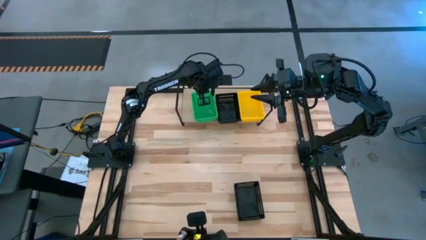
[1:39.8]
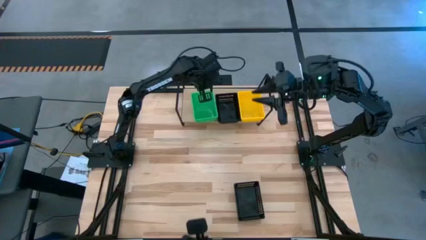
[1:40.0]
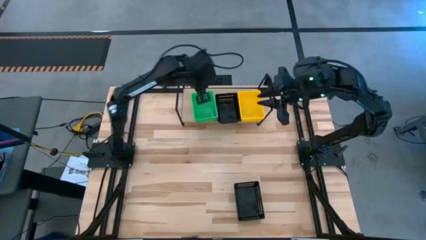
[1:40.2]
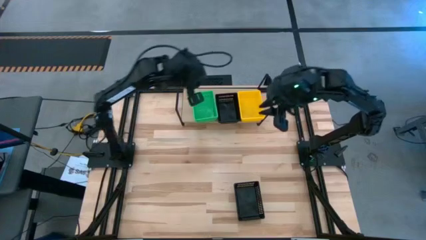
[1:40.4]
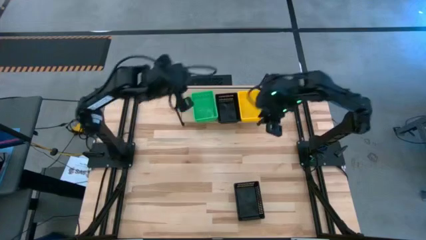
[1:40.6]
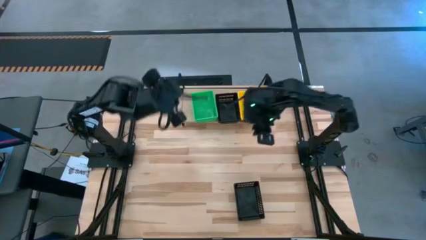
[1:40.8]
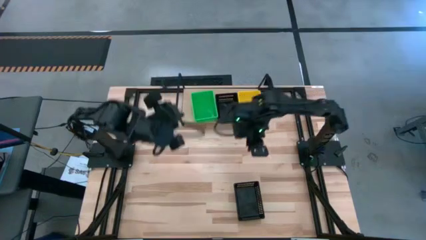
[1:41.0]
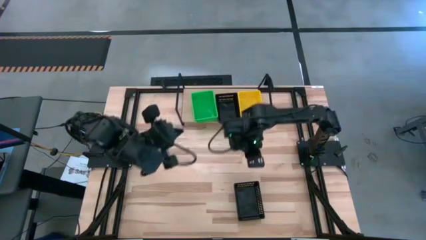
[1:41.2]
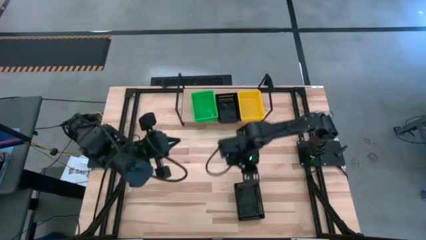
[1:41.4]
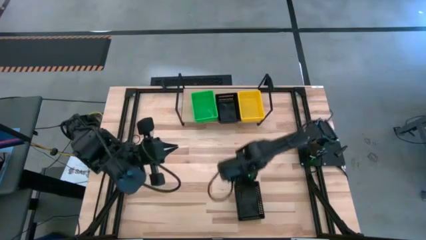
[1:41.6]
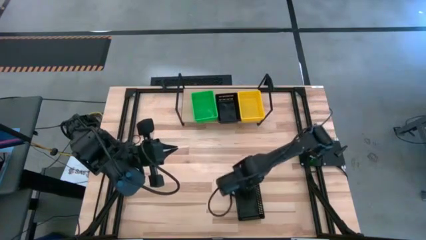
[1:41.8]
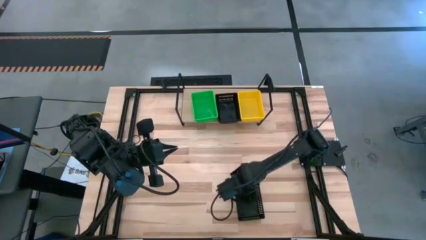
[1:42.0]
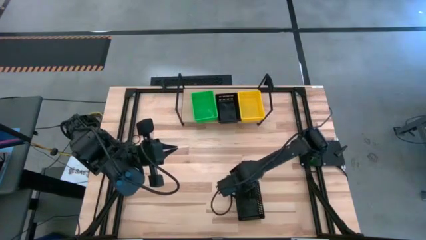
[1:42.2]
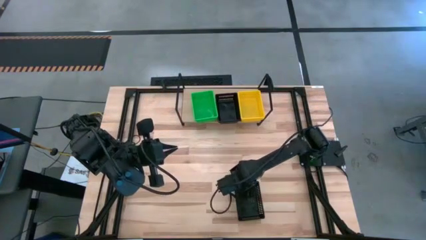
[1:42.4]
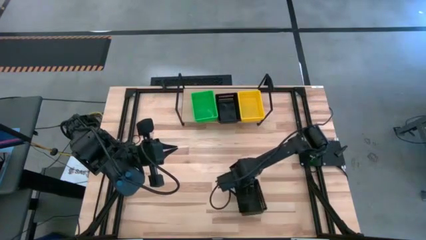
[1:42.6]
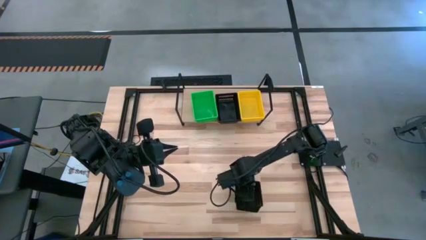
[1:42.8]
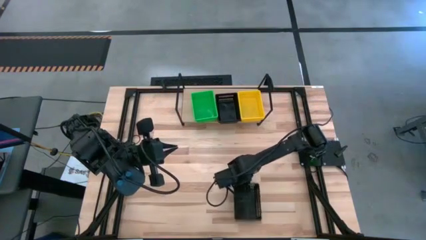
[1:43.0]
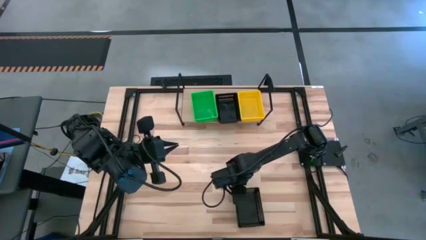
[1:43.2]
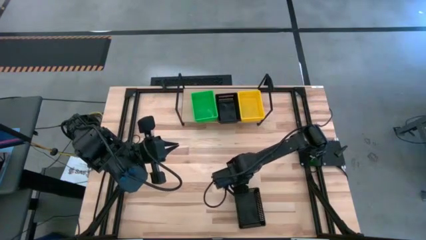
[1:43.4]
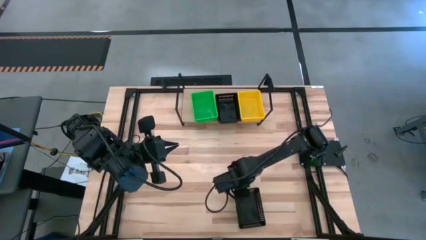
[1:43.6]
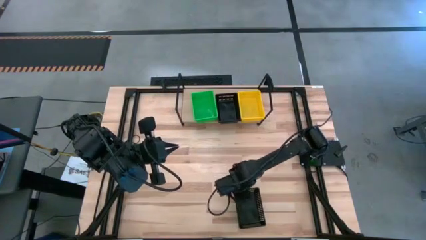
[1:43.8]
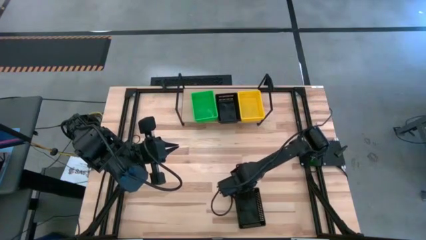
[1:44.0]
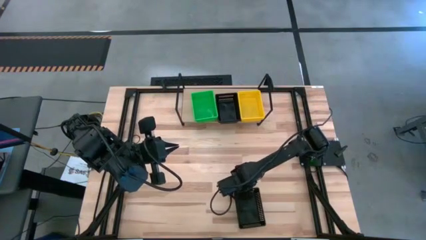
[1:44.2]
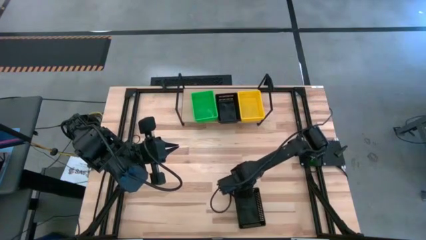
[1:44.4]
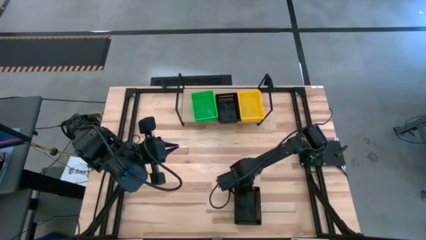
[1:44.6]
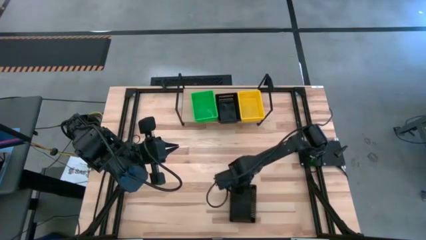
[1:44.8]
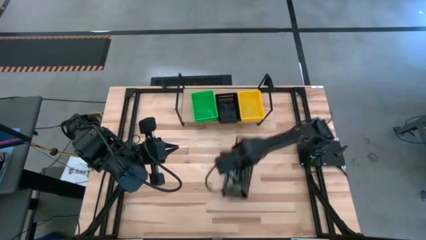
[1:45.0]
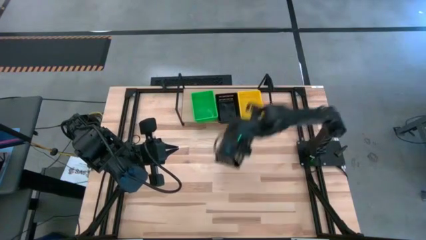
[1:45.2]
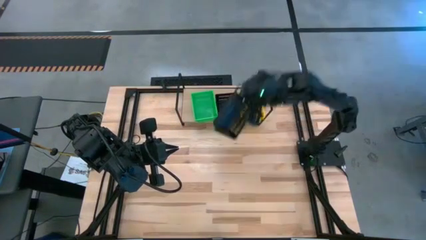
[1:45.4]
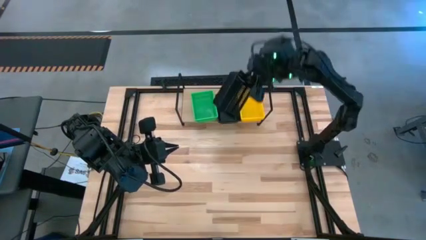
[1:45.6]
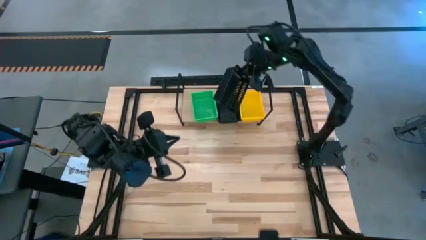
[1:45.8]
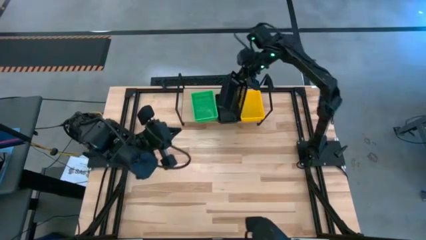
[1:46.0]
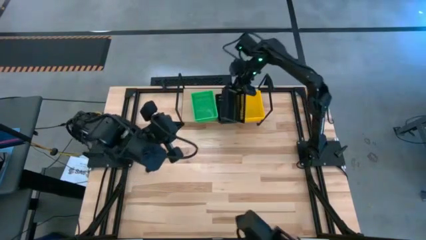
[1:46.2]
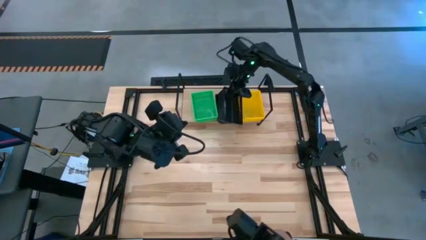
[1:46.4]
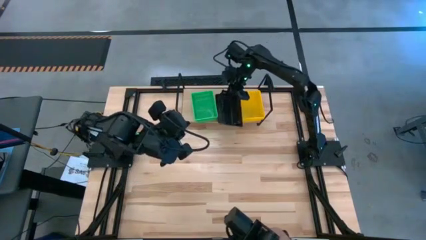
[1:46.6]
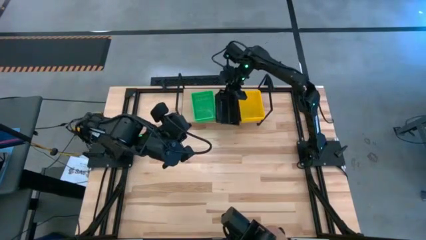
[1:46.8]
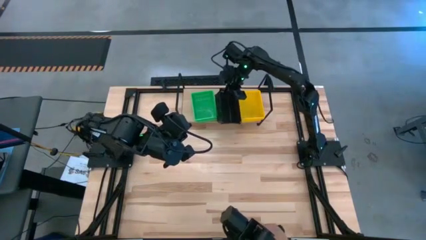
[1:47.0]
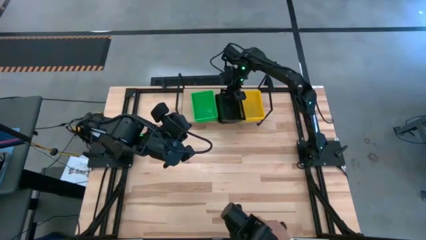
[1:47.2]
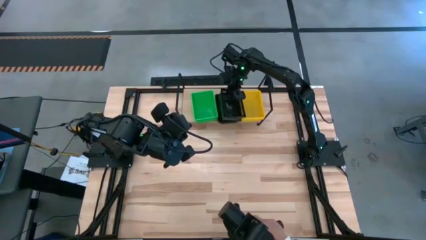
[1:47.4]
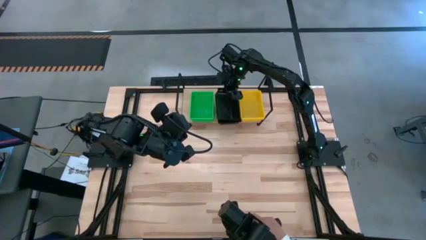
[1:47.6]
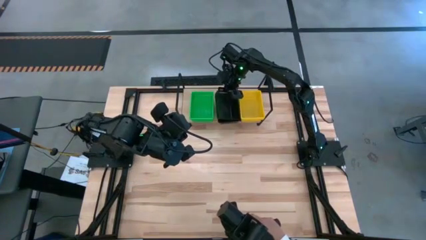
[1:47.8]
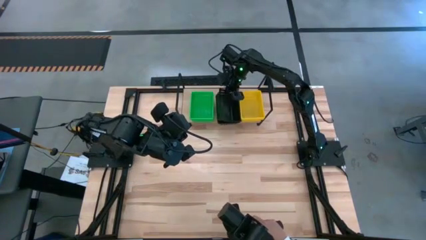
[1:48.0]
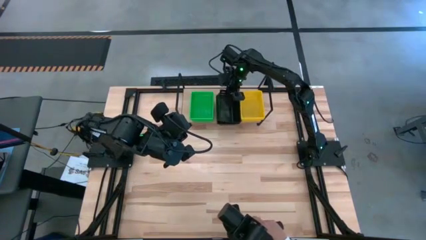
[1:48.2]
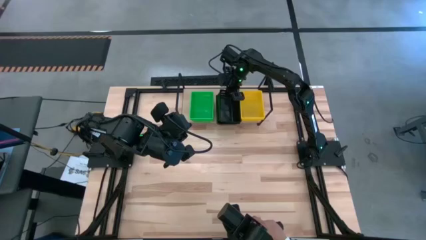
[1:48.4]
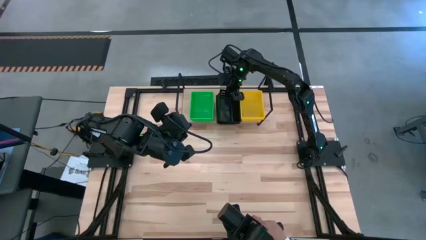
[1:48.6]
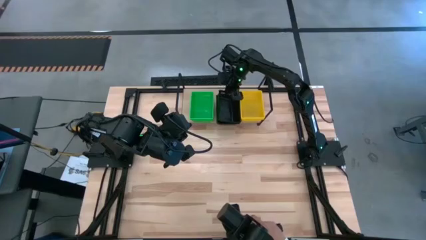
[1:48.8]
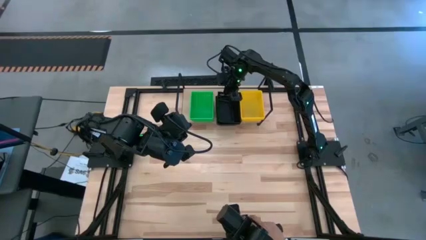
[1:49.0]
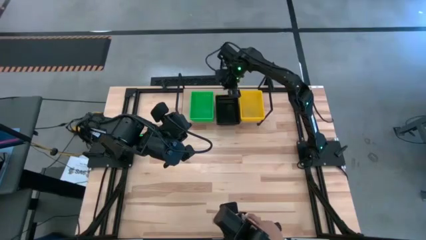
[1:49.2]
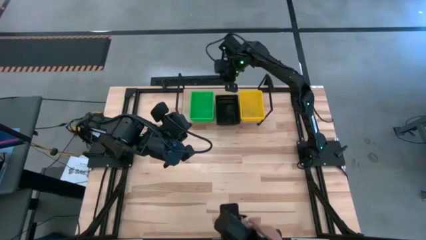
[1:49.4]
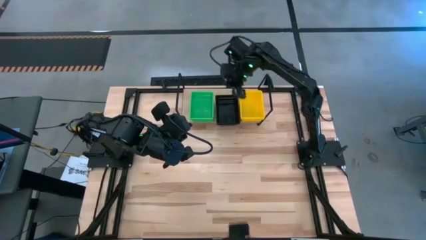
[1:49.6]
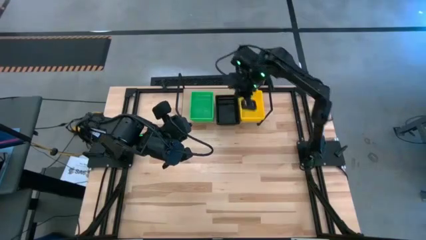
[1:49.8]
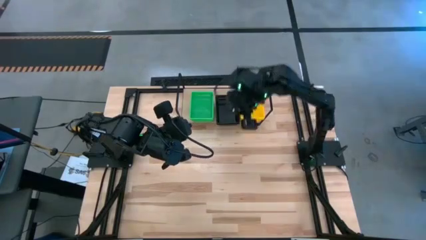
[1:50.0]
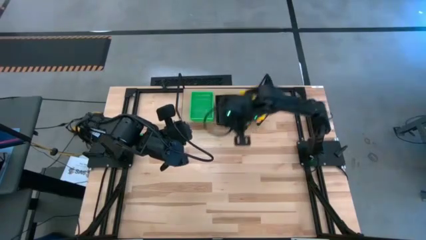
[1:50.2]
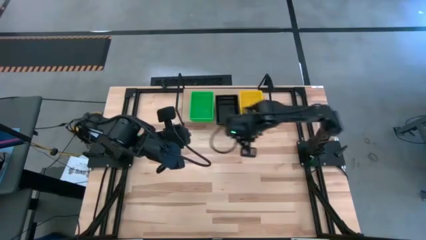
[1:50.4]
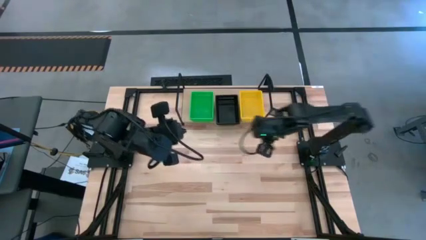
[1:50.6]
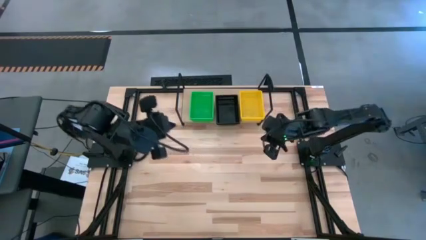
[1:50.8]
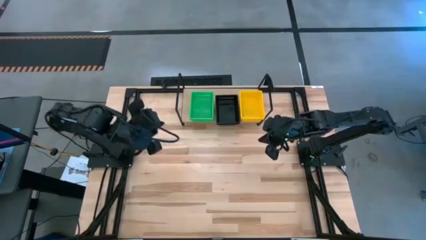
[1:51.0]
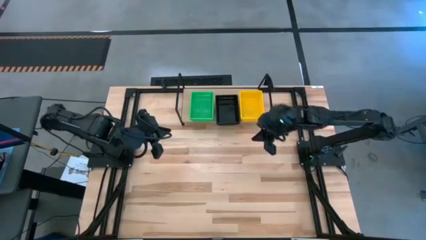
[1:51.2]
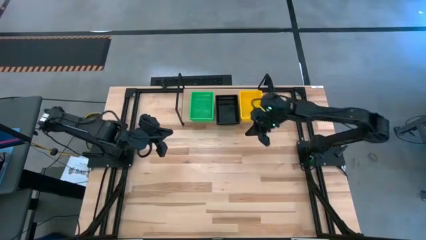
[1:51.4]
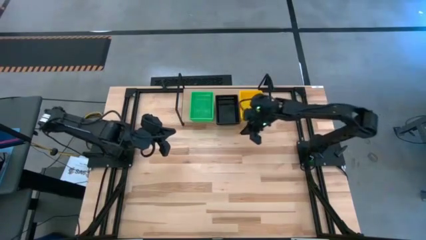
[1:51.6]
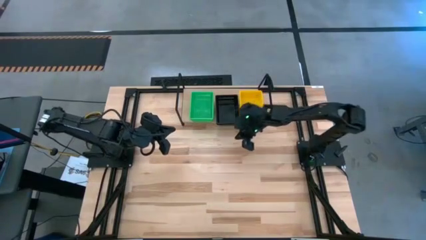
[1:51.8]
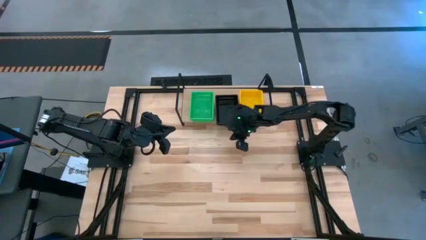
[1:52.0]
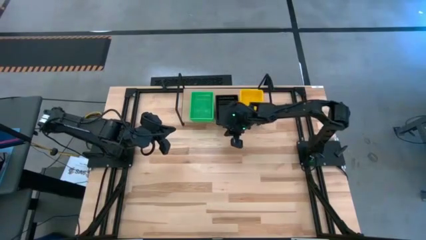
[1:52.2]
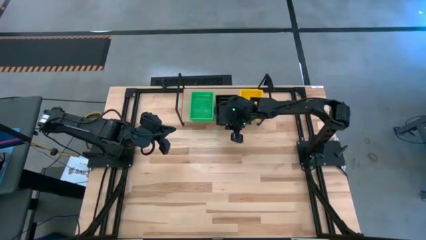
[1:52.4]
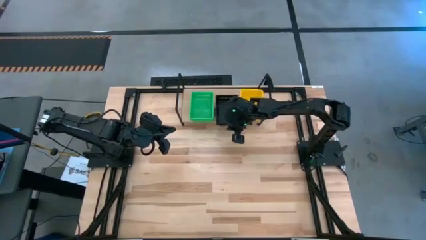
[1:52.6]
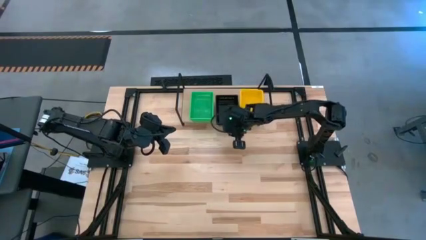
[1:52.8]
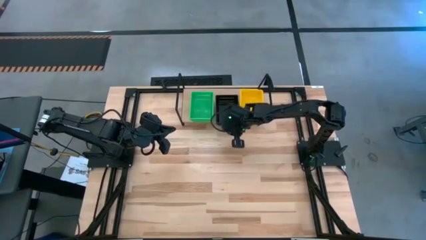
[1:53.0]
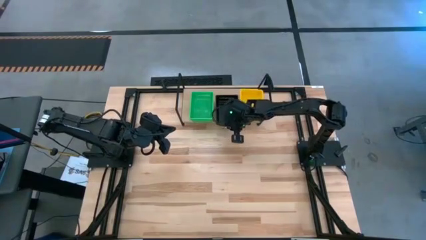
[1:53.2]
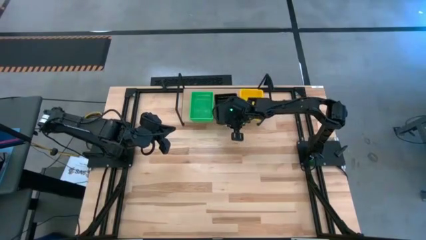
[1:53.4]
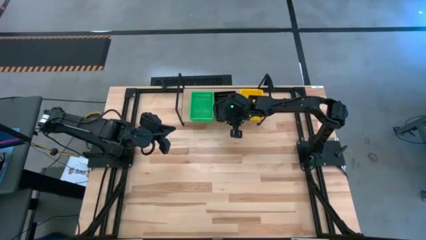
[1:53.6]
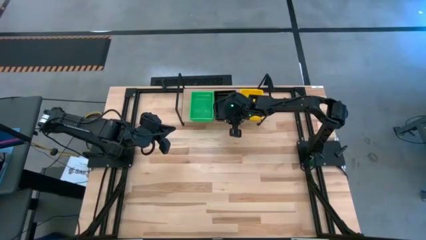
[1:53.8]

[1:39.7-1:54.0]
Task: Stack baskets on shelf by color
Stack the black bin on top of the black bin

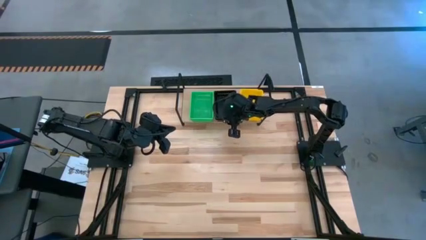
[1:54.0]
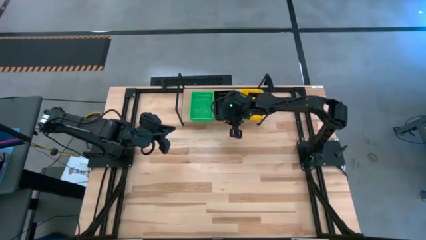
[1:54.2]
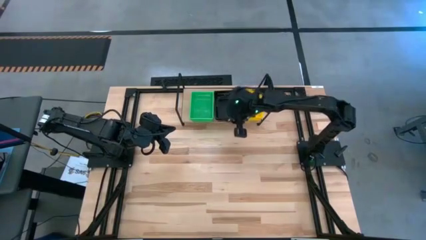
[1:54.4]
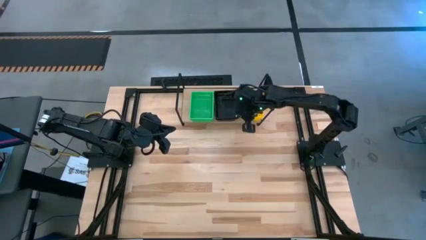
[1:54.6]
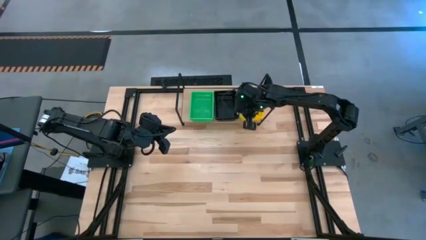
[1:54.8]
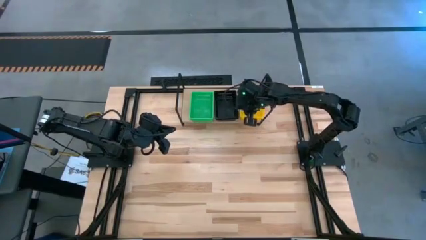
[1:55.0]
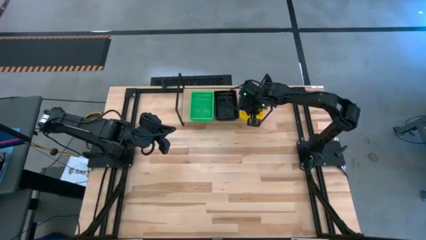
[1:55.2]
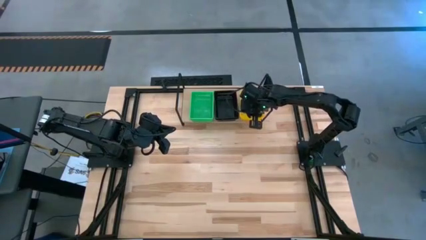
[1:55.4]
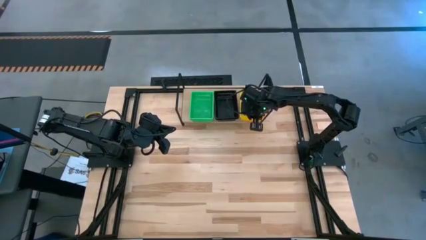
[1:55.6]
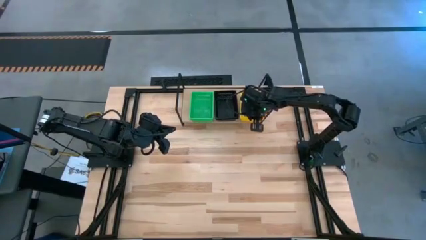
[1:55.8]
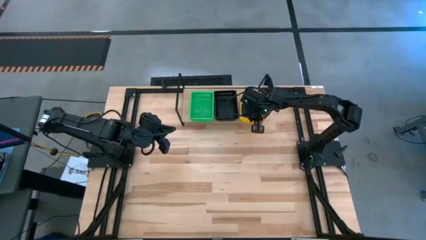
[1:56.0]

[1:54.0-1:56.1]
Adjust the stacked yellow bins on the shelf
